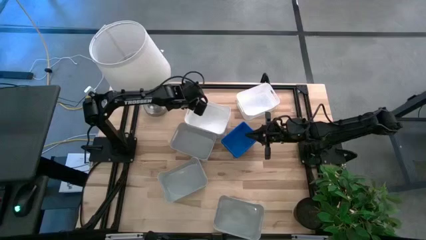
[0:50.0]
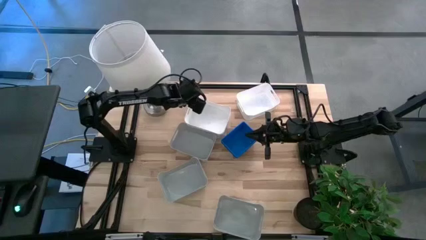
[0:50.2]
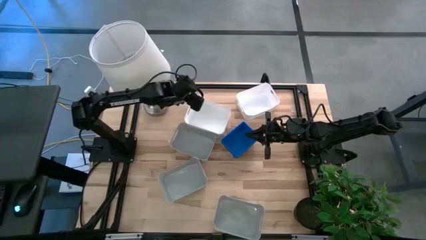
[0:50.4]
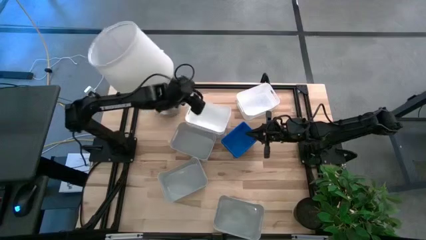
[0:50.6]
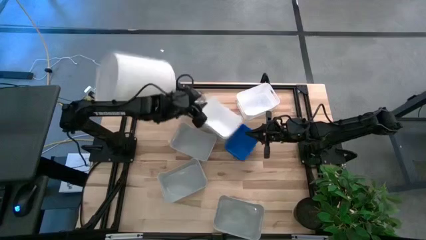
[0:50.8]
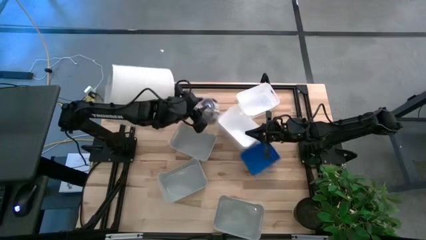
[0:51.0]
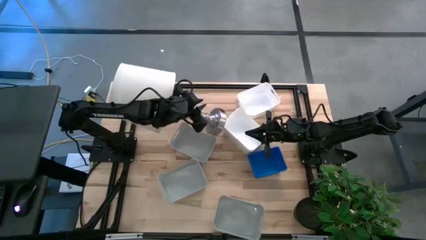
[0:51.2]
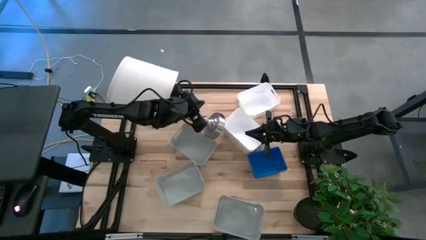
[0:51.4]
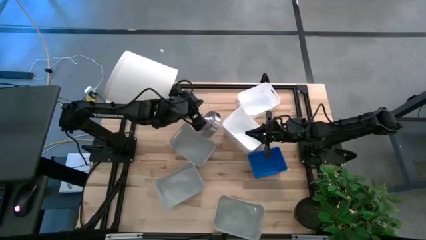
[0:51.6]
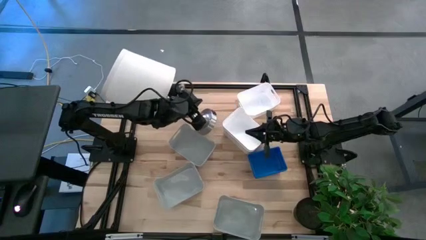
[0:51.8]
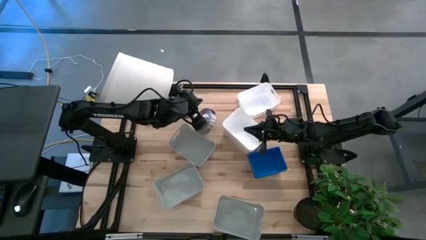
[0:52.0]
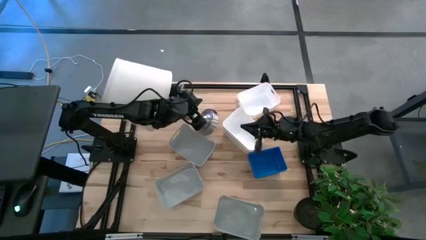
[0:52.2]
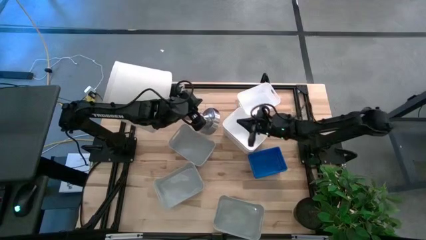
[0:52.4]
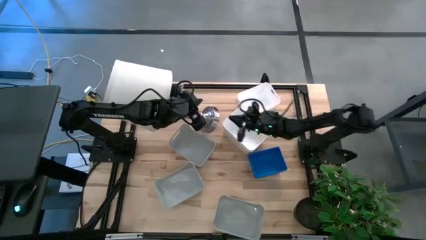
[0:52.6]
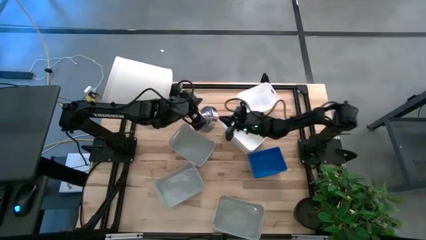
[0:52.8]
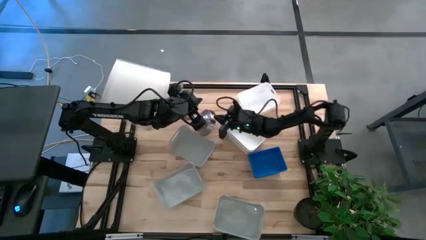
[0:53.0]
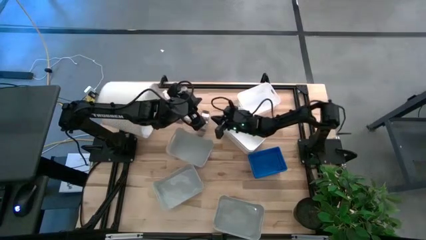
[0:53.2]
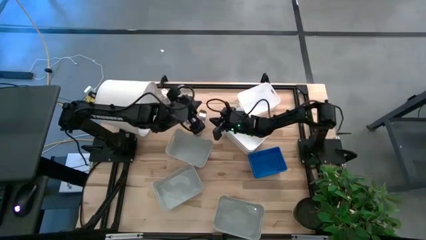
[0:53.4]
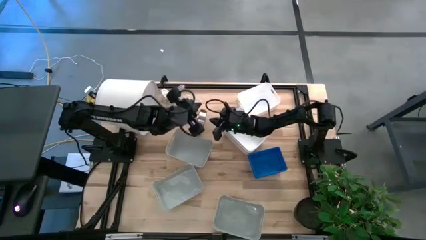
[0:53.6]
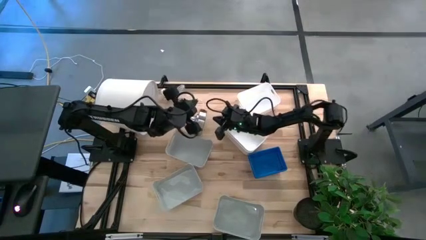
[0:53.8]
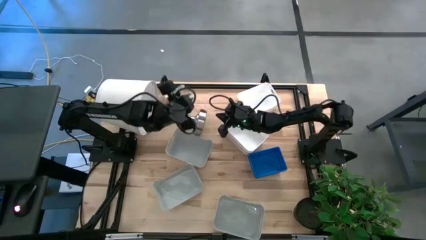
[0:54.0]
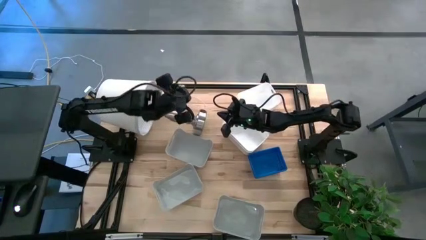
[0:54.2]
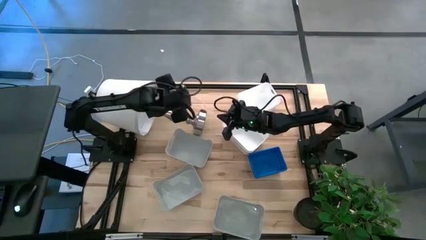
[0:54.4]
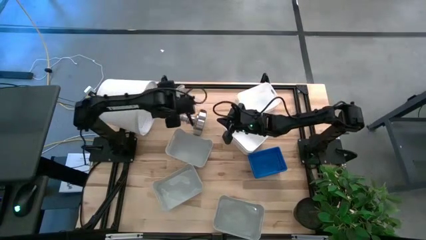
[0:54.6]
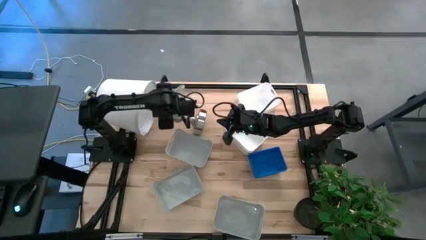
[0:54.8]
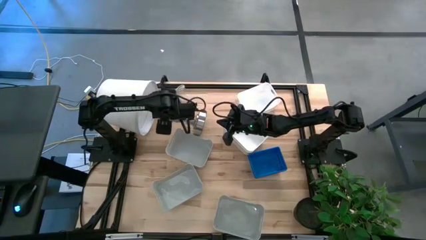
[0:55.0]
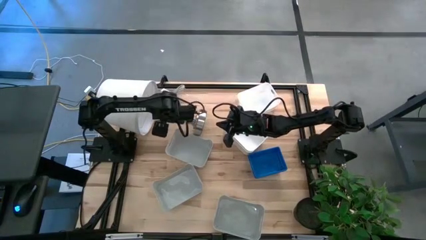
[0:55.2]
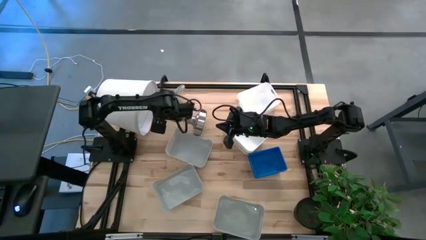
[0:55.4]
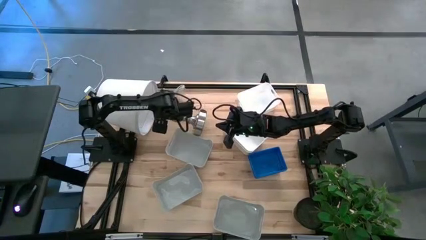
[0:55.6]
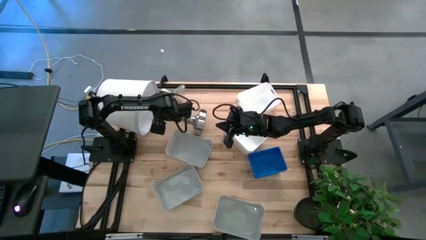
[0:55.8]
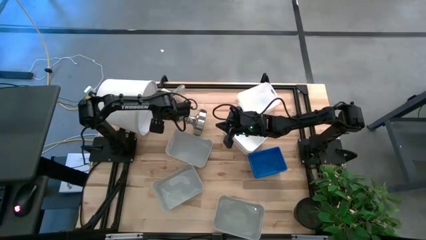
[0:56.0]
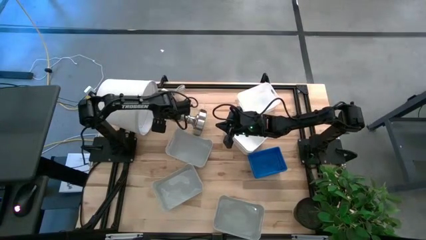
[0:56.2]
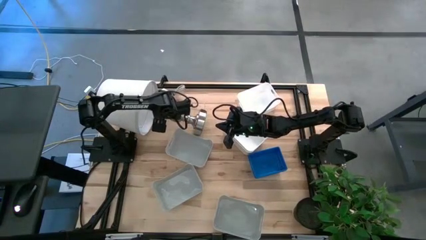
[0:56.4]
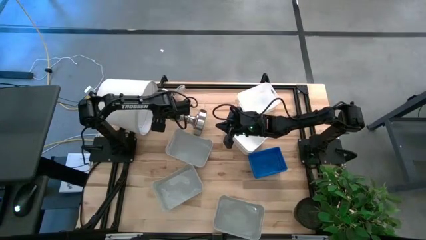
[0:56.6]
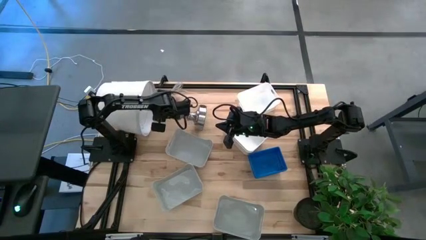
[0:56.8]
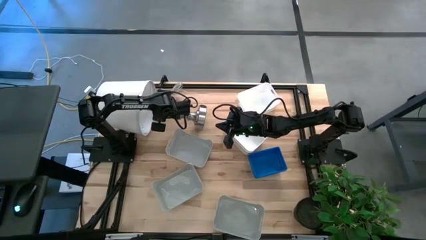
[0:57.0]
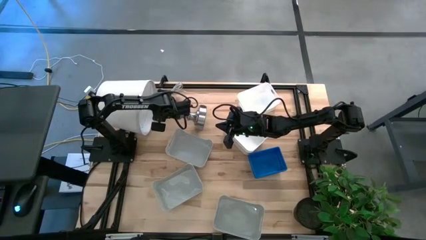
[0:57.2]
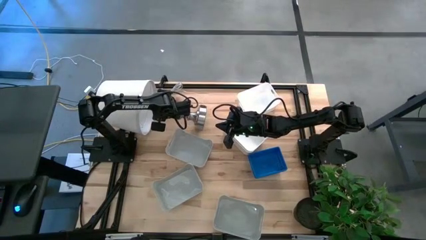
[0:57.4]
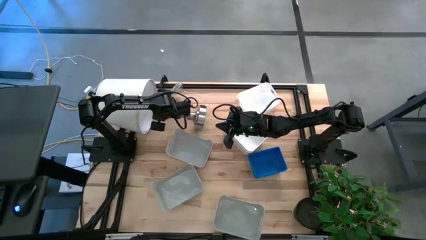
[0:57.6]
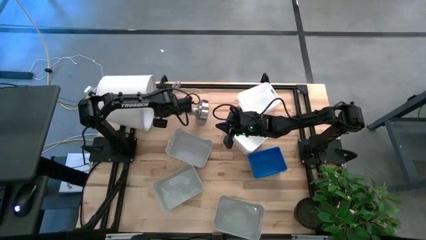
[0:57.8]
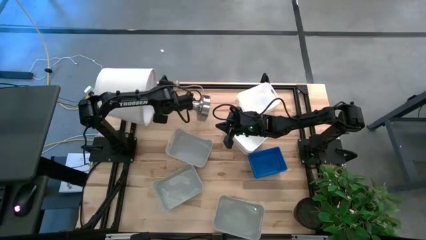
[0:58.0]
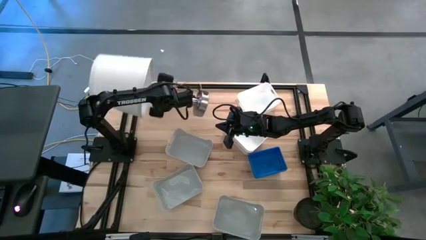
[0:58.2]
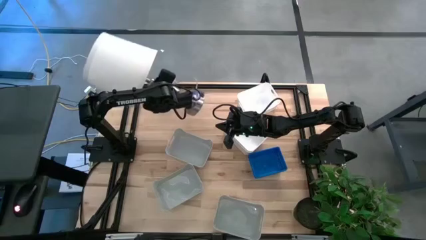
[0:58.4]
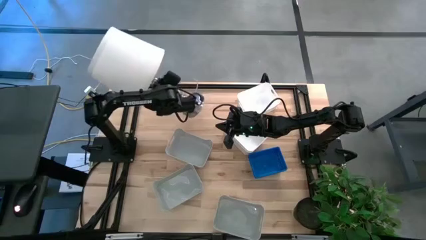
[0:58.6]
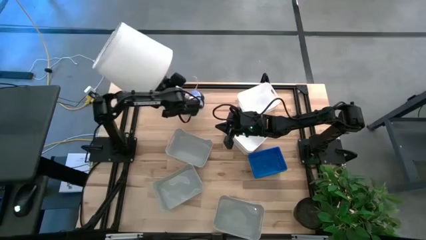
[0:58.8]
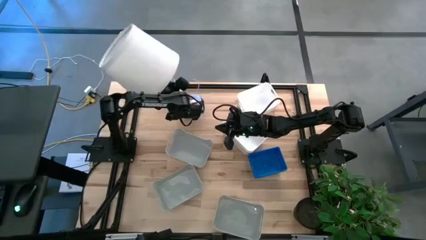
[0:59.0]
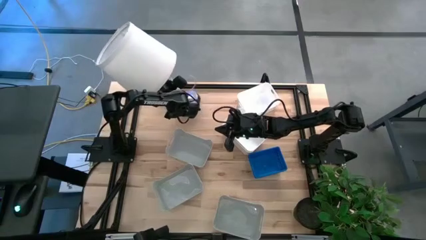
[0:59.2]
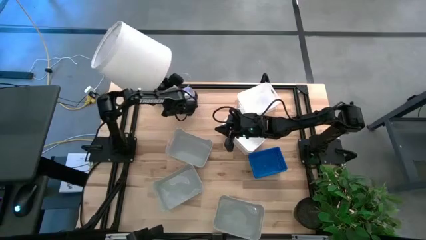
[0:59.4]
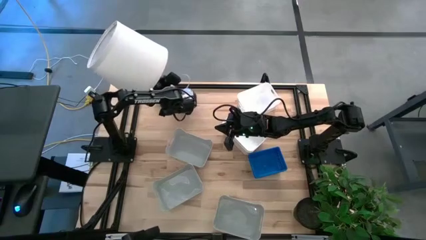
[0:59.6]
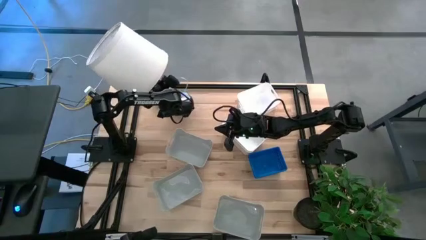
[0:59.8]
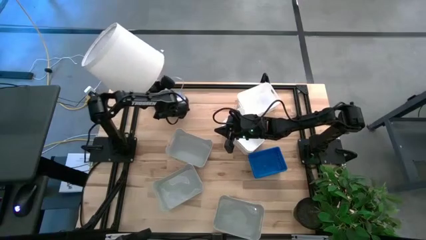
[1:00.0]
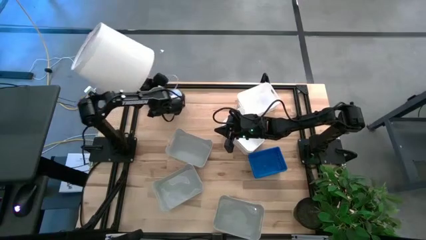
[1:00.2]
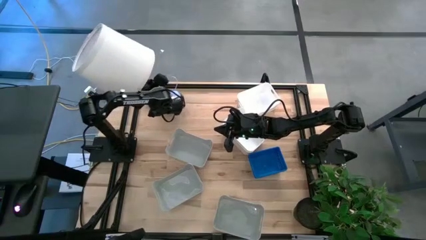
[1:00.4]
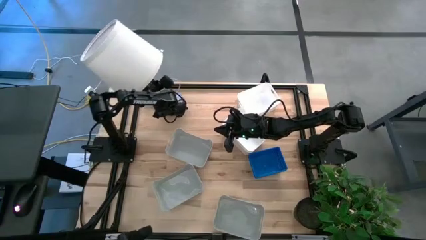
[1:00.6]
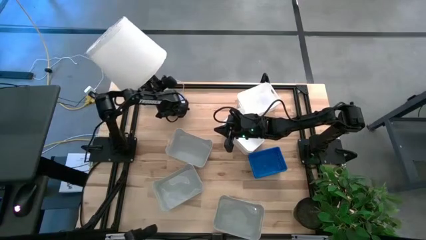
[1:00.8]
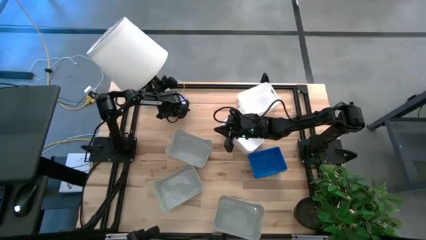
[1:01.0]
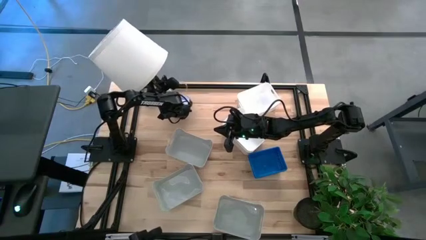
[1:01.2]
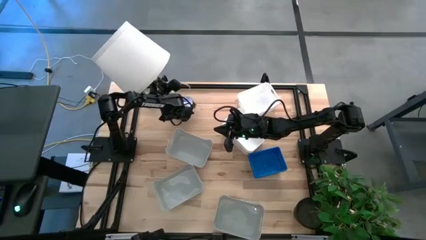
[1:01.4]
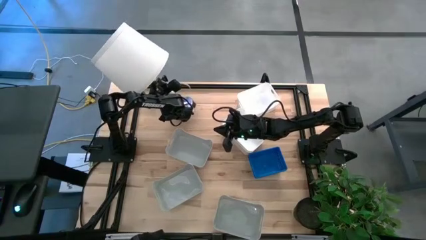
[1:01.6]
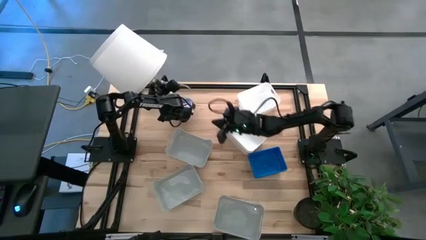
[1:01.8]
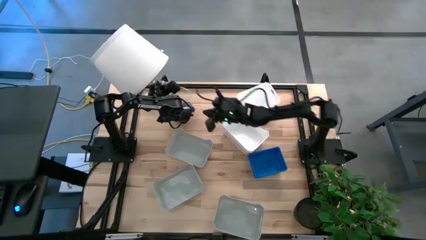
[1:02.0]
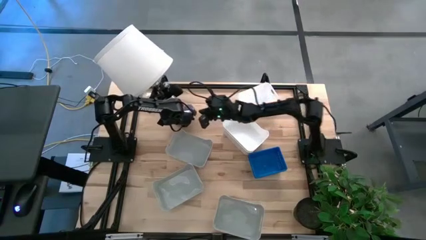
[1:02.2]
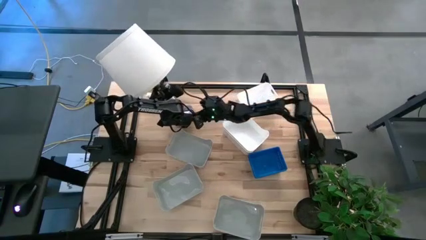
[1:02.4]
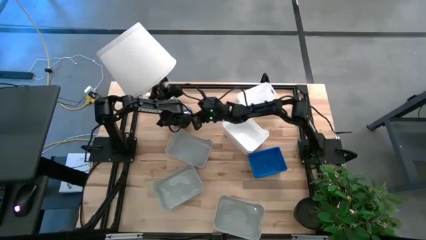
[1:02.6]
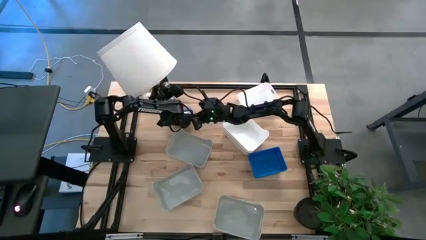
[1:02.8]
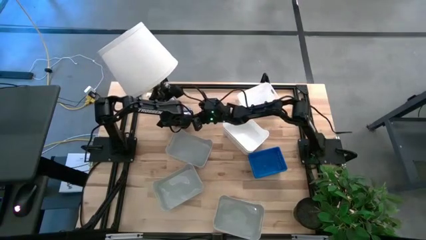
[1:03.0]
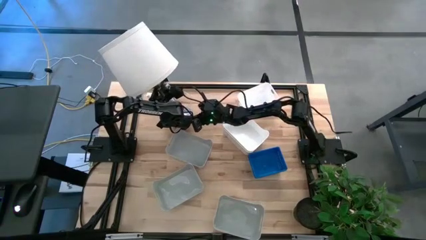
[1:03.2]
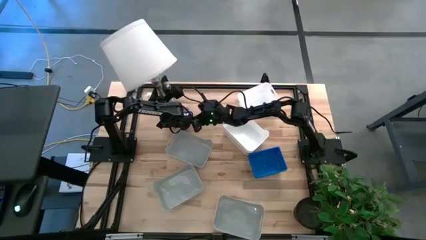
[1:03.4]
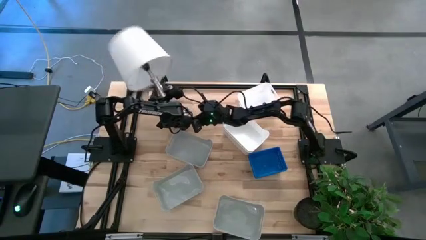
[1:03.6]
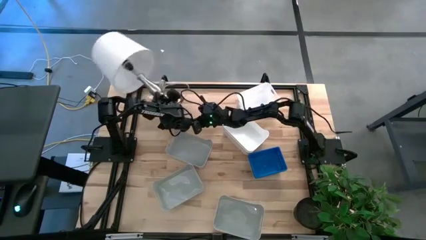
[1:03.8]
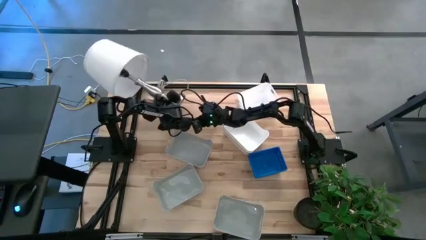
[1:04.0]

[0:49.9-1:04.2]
Adjust the white lamp shade
